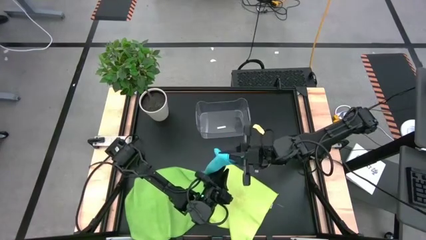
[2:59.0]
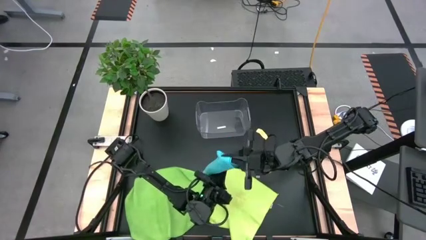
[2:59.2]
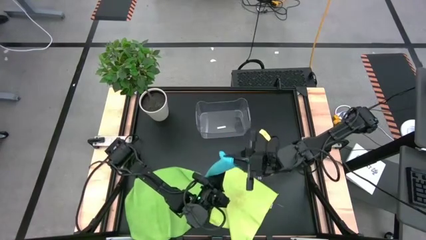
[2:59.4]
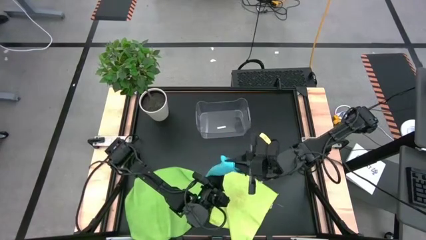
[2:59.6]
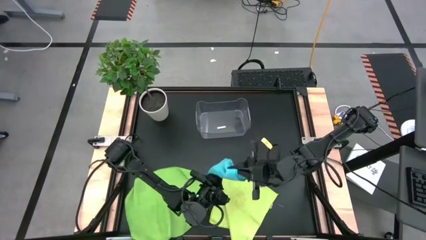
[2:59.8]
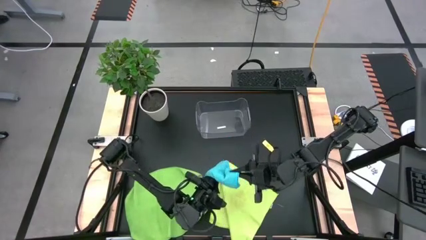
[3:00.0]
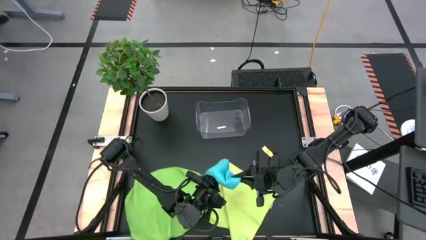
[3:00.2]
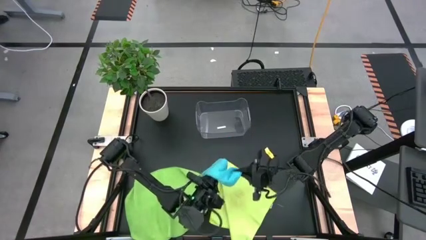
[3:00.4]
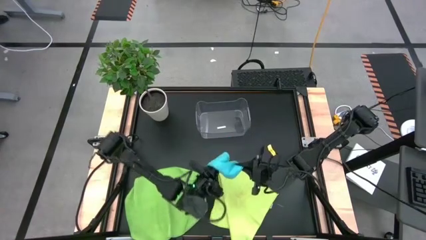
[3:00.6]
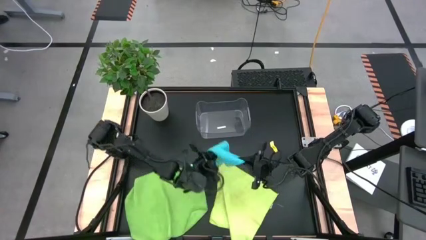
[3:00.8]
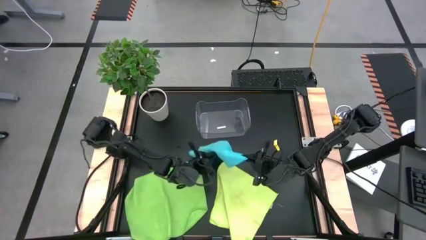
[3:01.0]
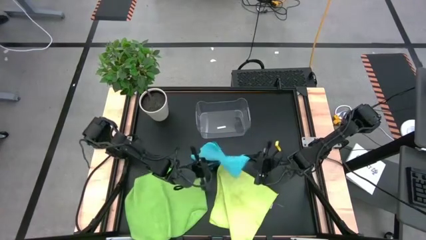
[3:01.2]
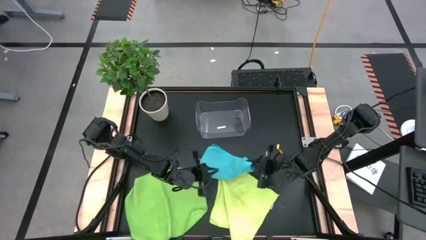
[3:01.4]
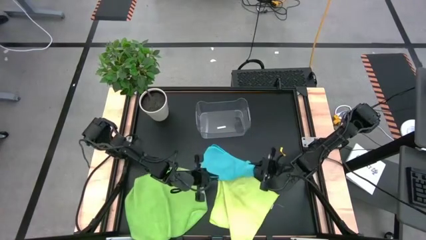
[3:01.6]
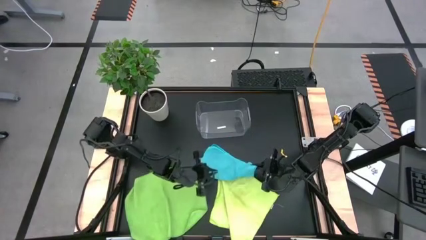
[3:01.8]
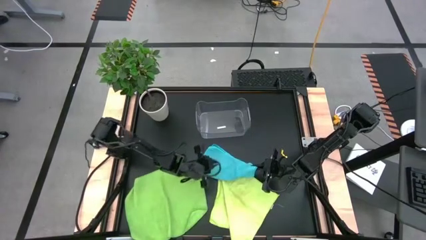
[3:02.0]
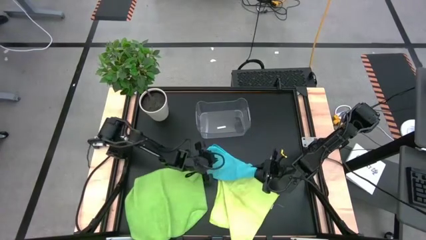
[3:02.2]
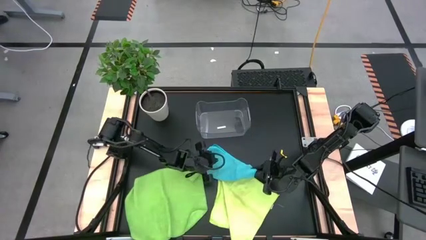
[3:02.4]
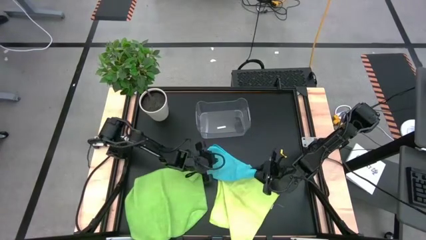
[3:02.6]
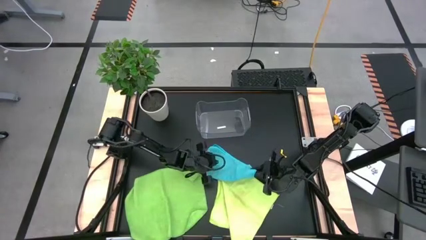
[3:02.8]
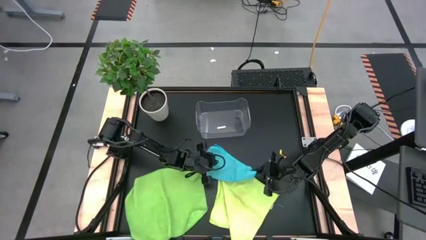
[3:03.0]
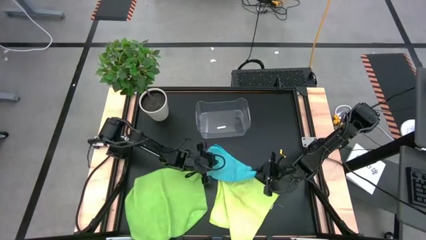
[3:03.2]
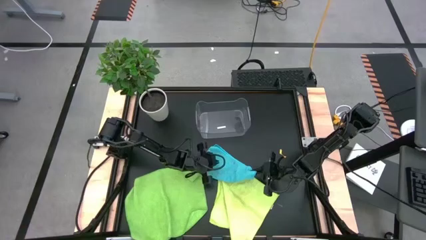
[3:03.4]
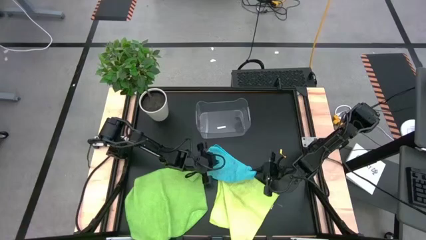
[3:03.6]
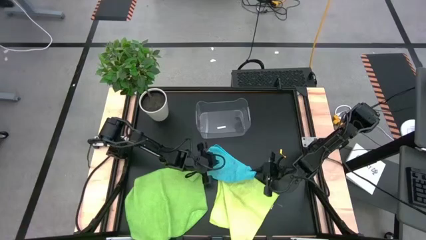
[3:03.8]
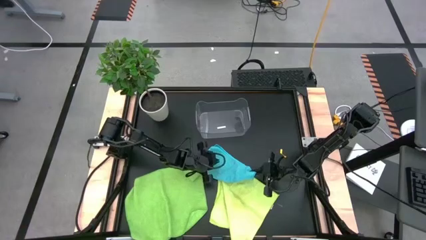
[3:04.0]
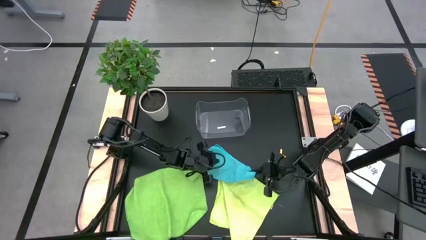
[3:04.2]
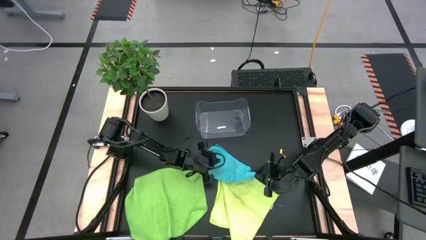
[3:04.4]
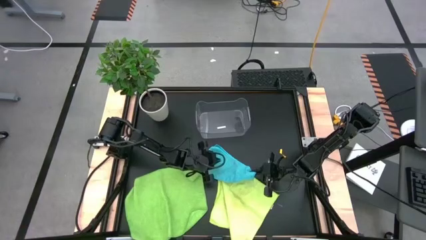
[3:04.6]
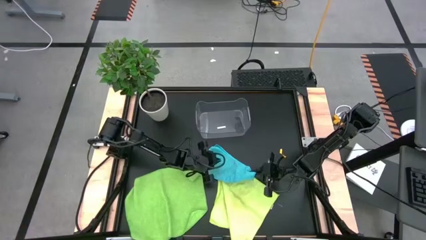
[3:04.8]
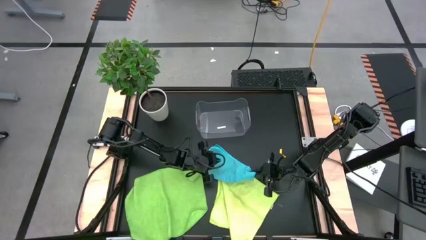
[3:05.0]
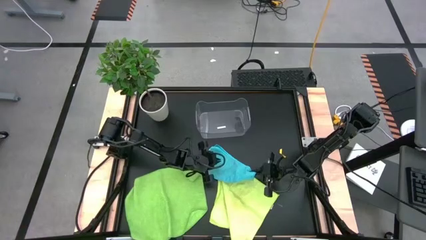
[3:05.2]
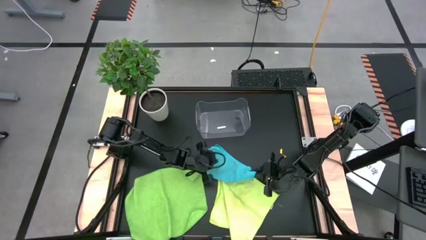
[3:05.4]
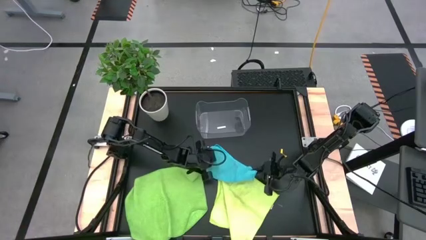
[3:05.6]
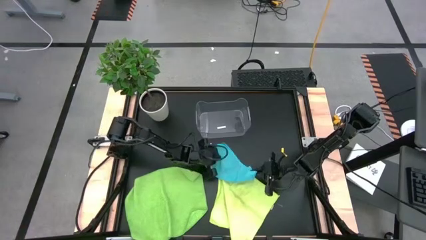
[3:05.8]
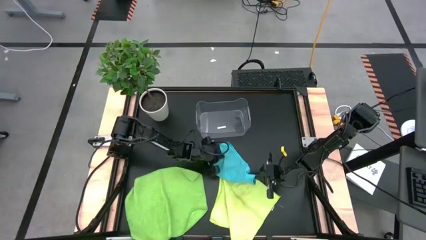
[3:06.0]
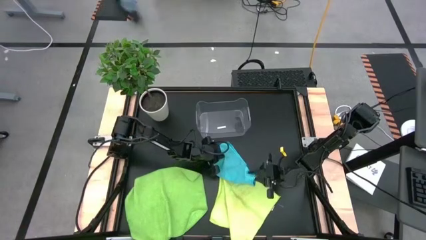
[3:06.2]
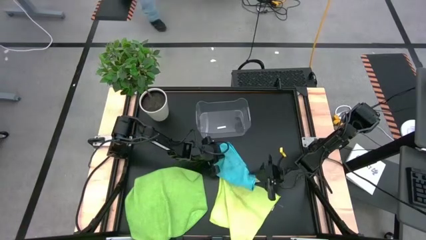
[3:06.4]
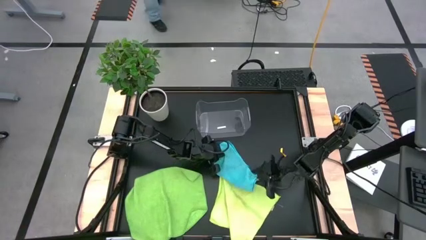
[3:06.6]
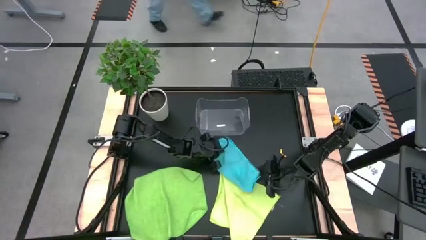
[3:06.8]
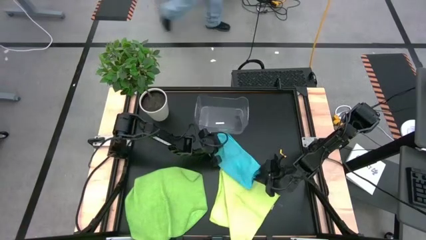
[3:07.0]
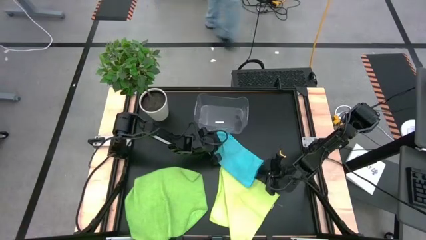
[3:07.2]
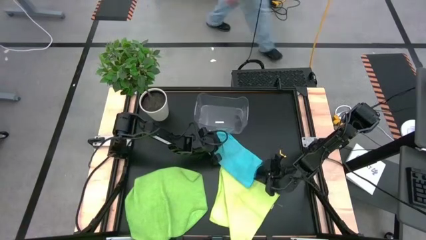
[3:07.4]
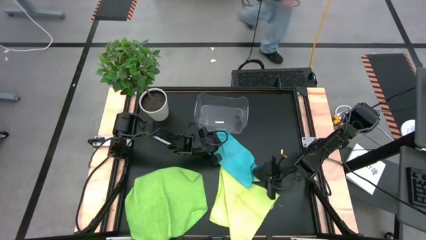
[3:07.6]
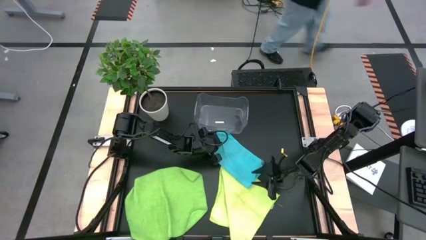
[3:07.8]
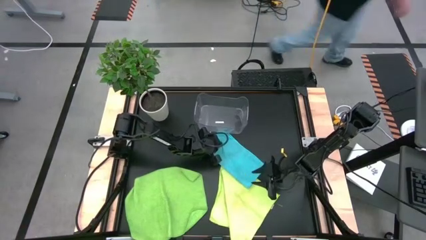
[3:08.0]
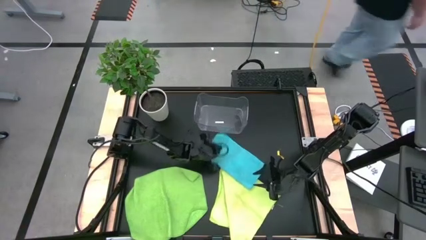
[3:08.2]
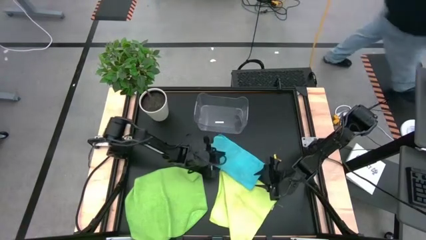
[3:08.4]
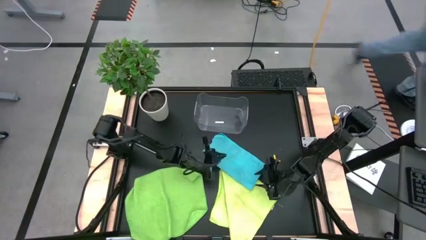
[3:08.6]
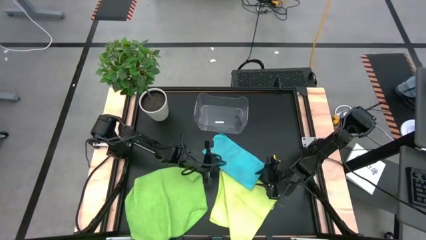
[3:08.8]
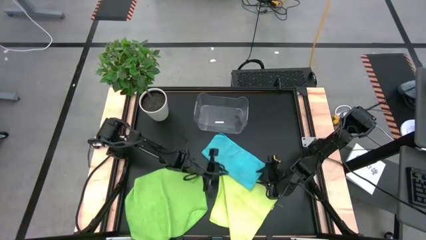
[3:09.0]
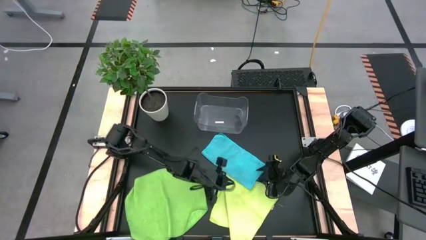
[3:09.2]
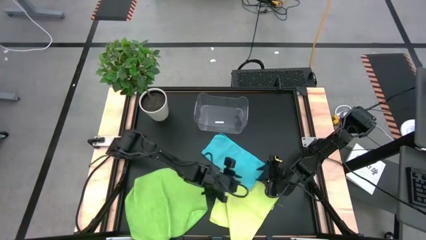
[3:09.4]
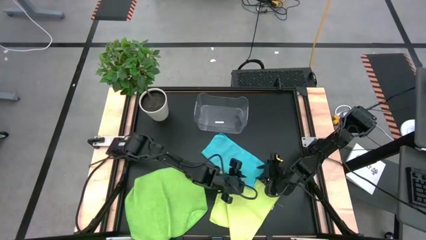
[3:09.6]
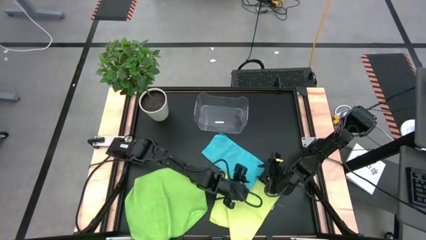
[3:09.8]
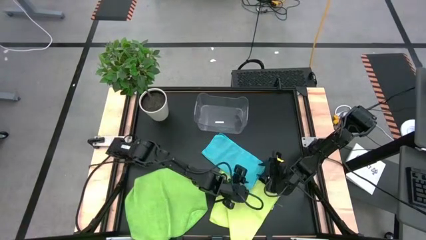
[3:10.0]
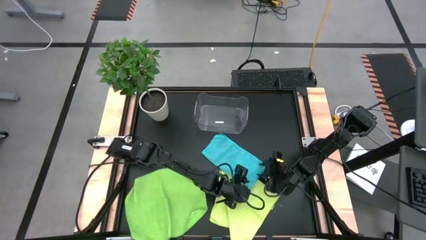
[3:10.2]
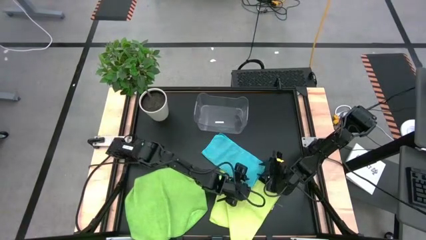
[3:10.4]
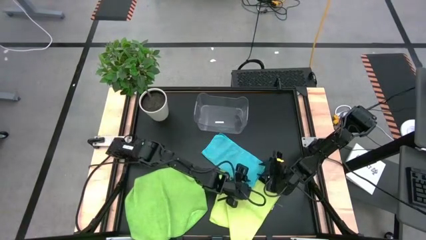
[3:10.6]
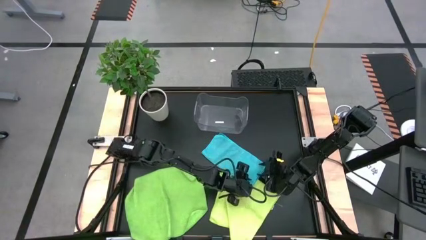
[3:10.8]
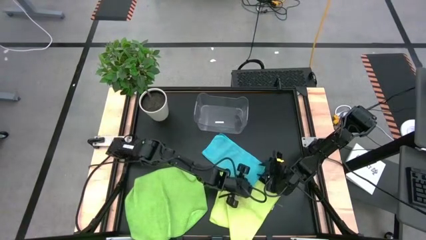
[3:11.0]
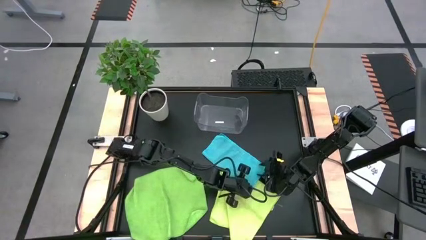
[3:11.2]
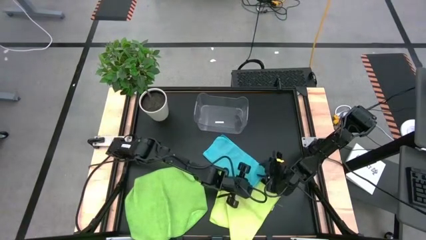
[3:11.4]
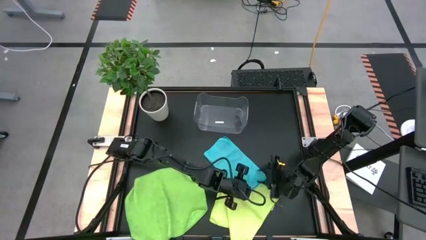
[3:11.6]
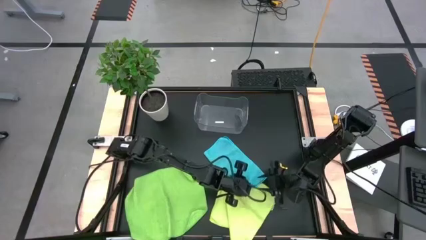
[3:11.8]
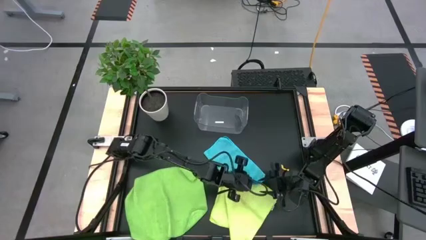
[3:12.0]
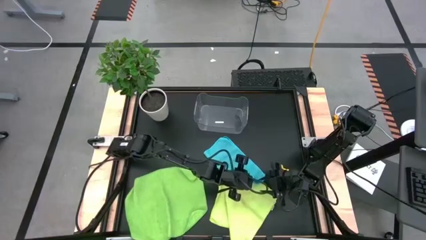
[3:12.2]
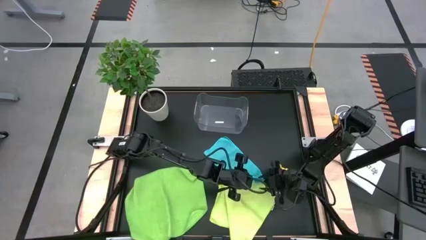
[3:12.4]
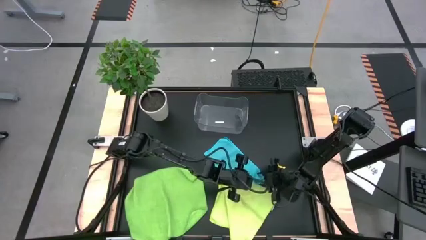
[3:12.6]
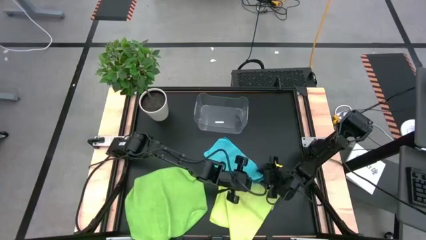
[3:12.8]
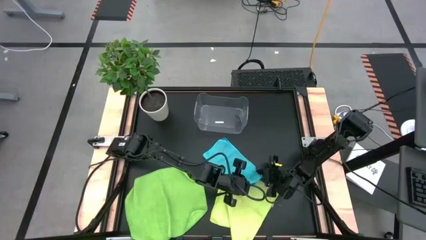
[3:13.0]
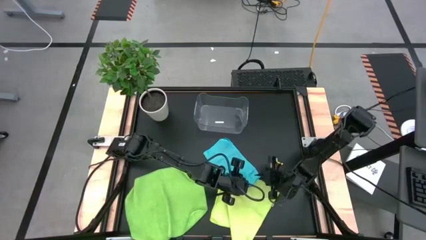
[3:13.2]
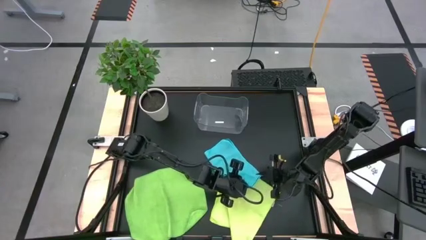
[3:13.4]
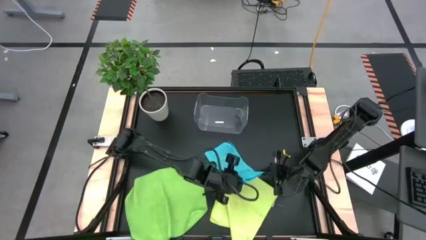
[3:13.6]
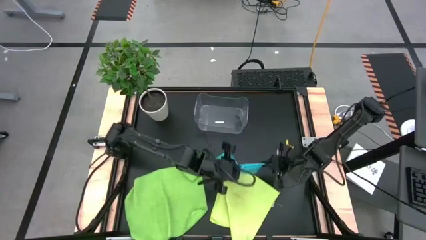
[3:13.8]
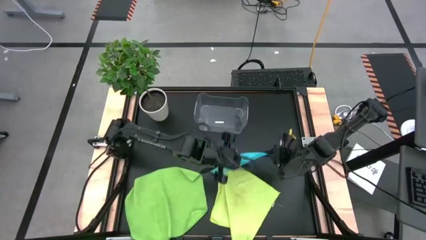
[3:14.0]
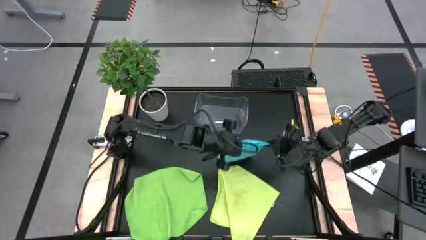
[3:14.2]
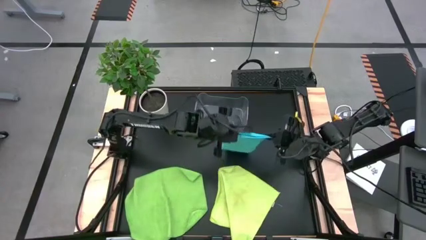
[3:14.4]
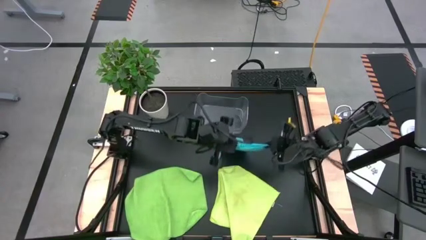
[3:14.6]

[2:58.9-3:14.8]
Task: Fold microfiber towels
Fold the blue towel
